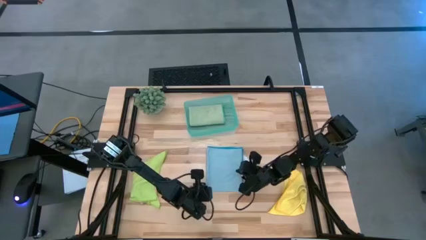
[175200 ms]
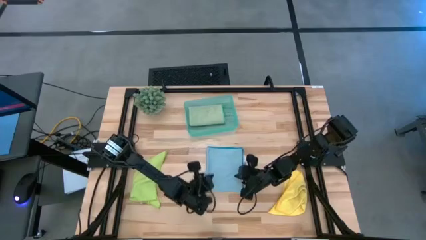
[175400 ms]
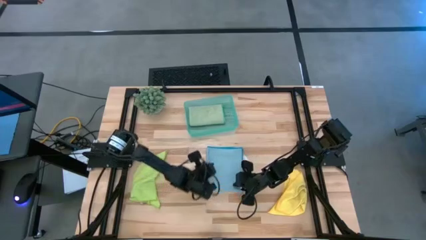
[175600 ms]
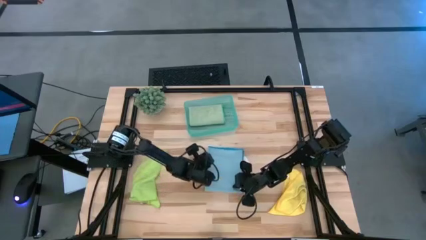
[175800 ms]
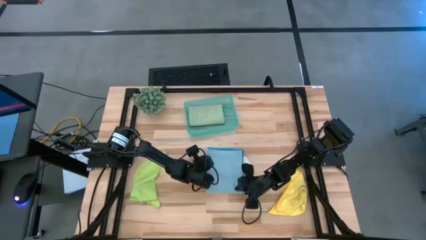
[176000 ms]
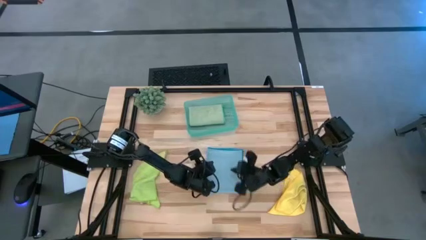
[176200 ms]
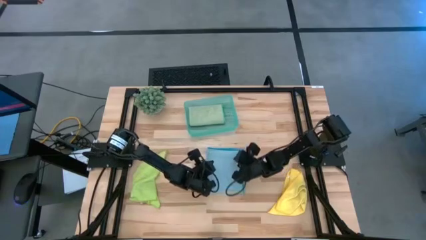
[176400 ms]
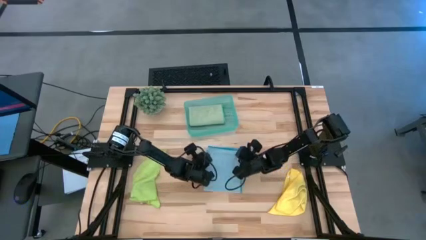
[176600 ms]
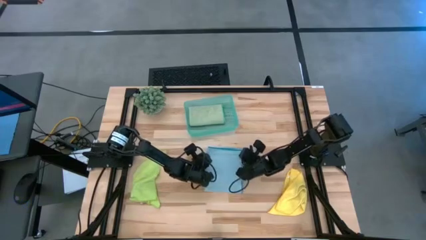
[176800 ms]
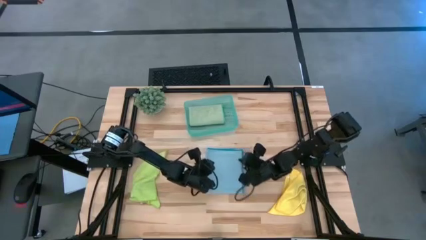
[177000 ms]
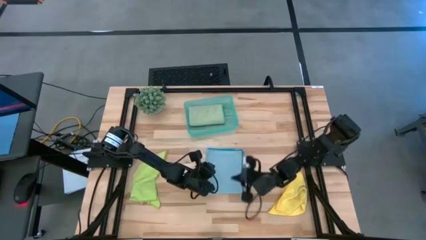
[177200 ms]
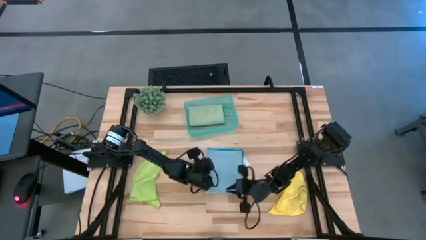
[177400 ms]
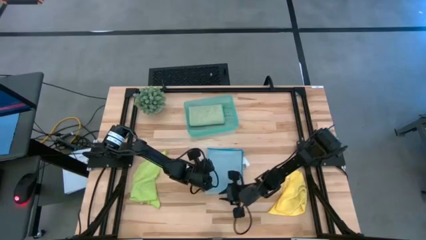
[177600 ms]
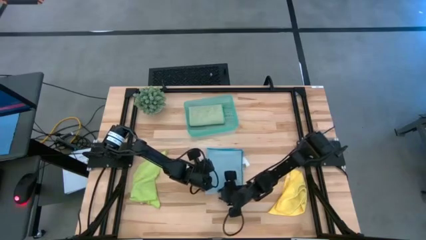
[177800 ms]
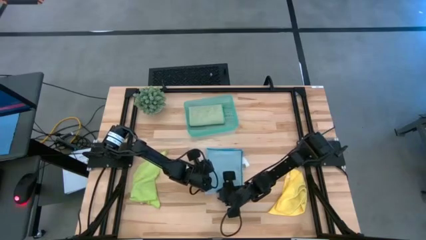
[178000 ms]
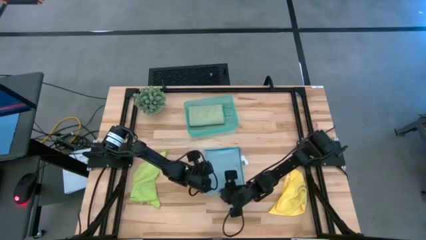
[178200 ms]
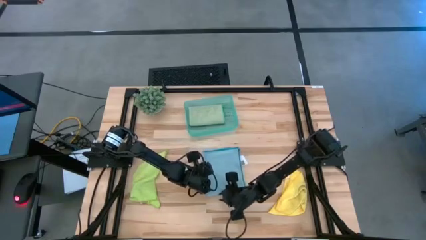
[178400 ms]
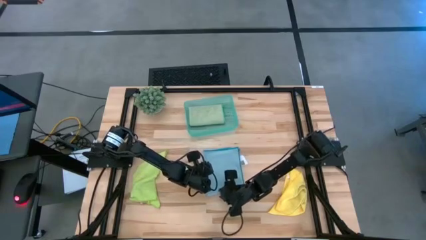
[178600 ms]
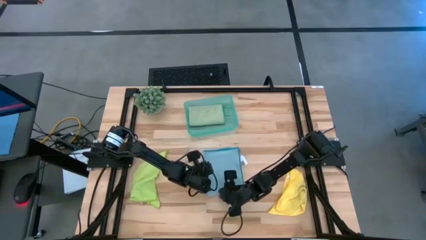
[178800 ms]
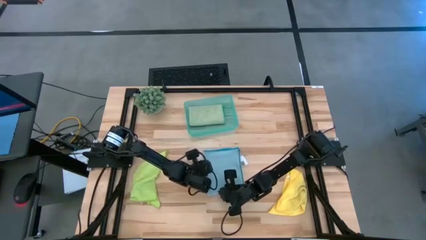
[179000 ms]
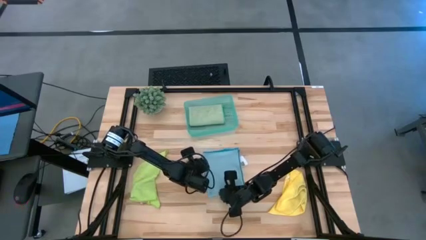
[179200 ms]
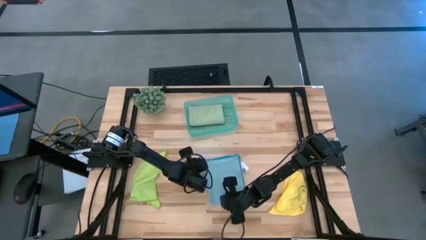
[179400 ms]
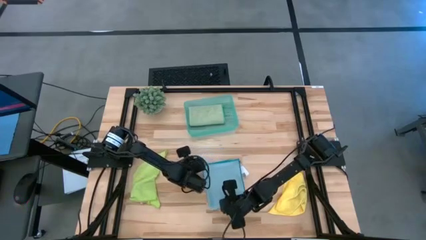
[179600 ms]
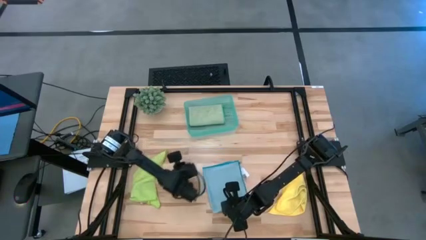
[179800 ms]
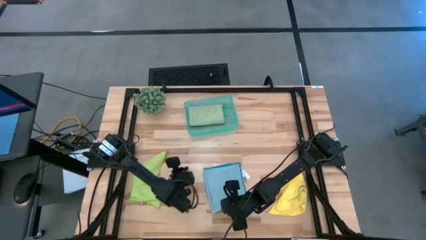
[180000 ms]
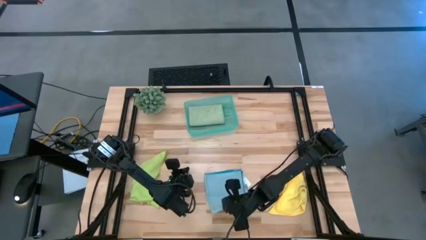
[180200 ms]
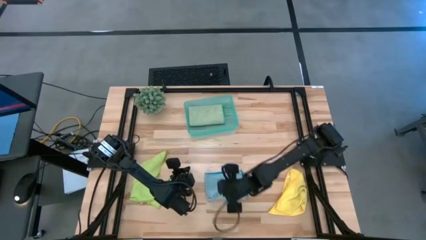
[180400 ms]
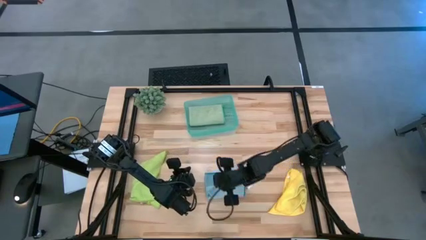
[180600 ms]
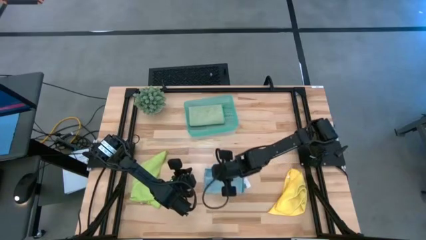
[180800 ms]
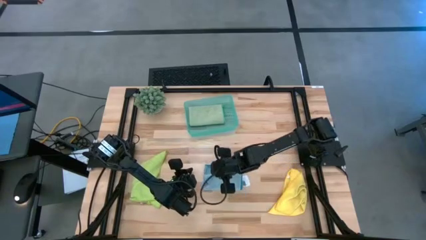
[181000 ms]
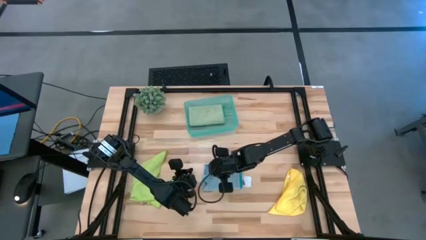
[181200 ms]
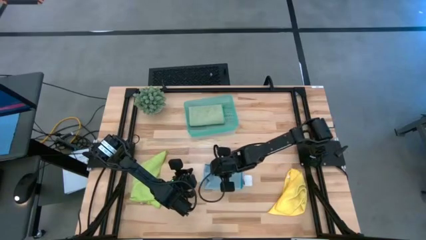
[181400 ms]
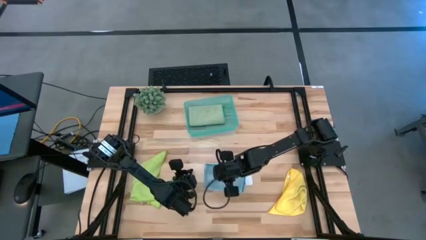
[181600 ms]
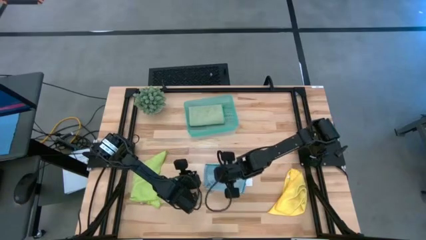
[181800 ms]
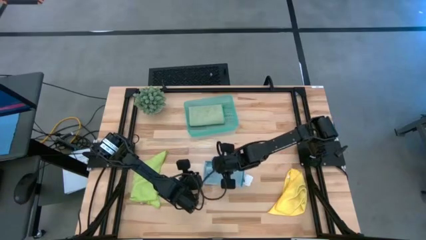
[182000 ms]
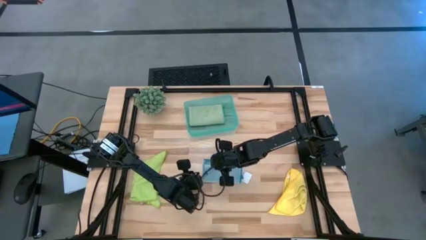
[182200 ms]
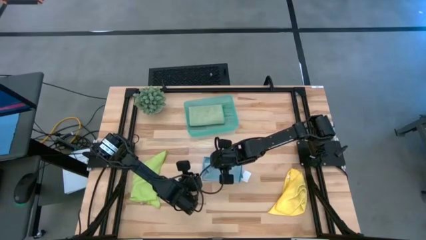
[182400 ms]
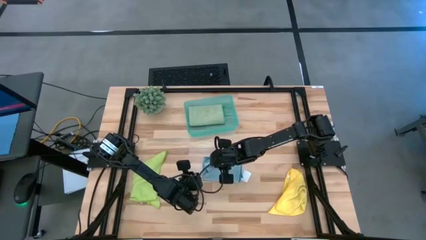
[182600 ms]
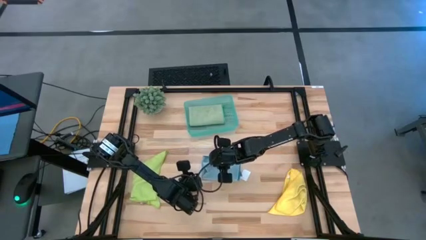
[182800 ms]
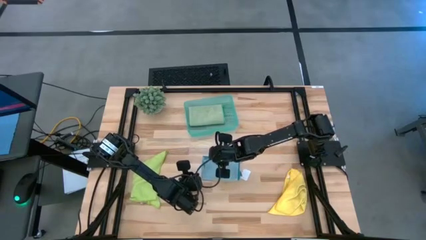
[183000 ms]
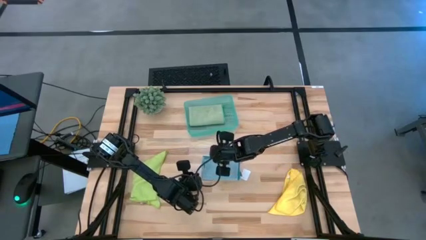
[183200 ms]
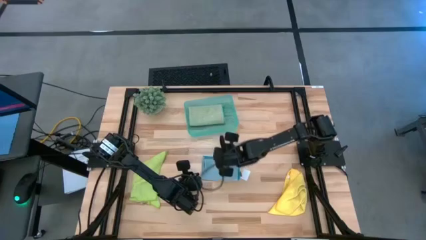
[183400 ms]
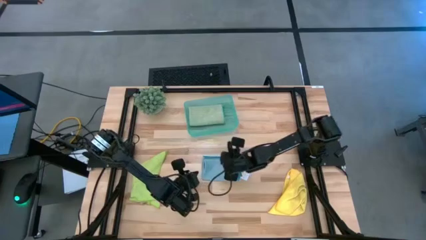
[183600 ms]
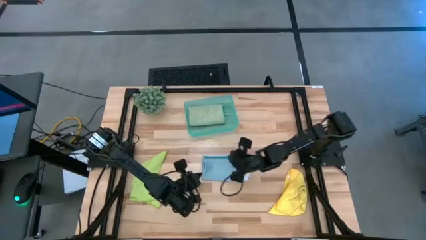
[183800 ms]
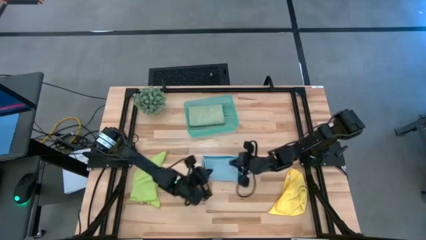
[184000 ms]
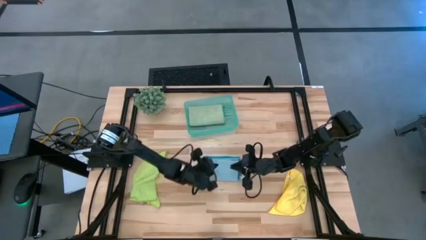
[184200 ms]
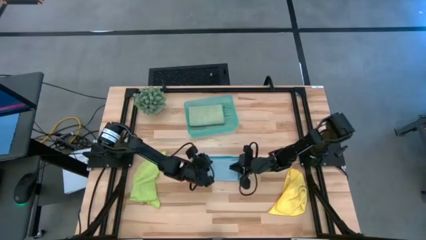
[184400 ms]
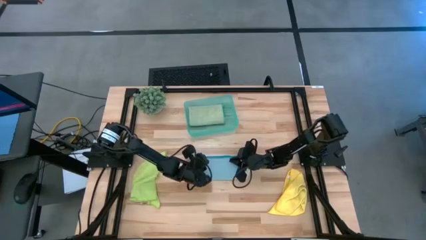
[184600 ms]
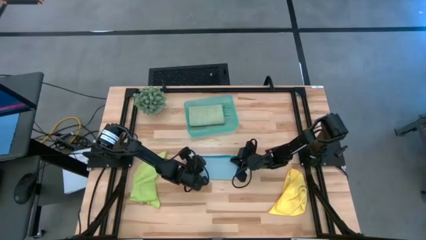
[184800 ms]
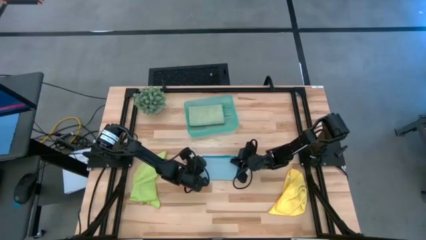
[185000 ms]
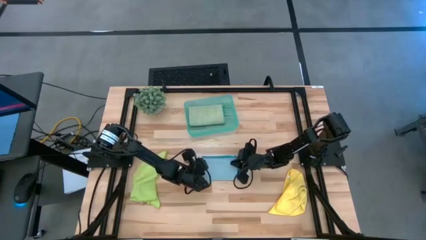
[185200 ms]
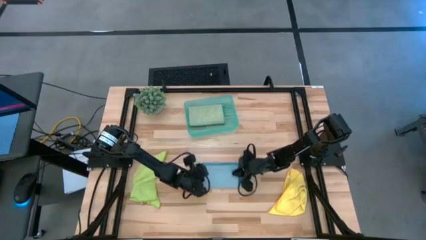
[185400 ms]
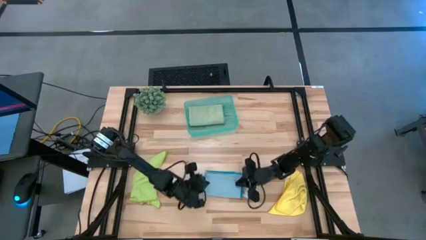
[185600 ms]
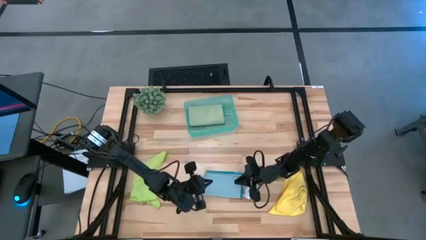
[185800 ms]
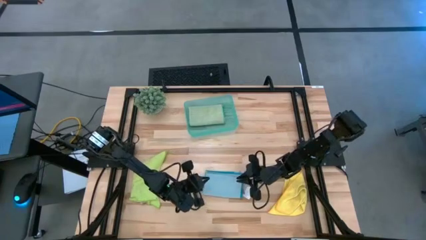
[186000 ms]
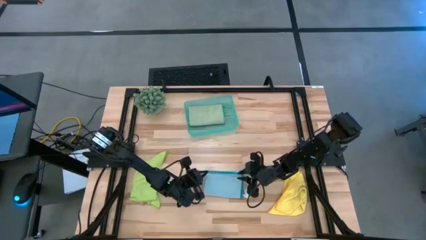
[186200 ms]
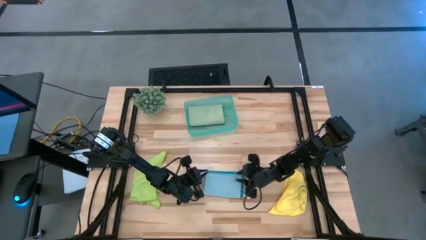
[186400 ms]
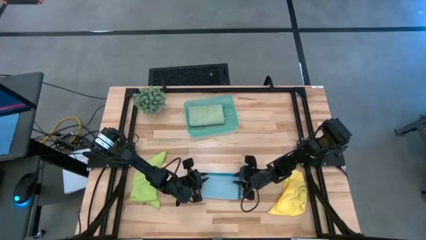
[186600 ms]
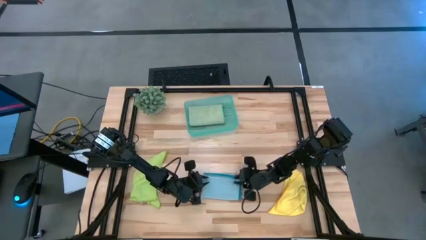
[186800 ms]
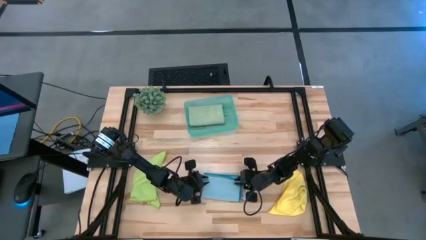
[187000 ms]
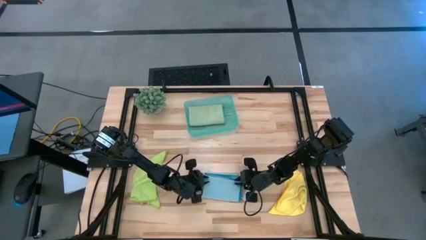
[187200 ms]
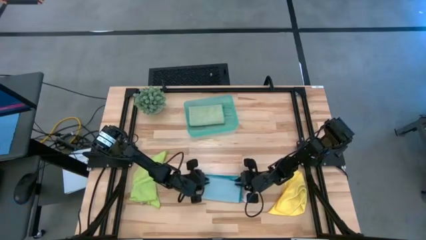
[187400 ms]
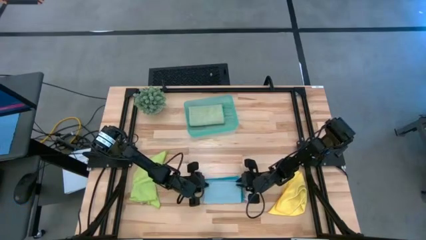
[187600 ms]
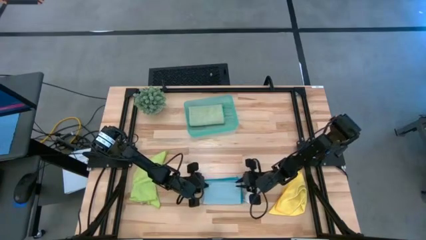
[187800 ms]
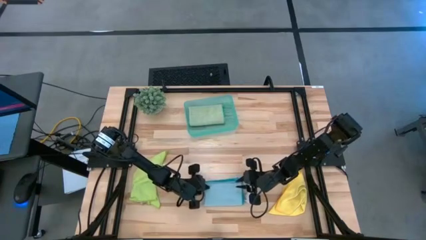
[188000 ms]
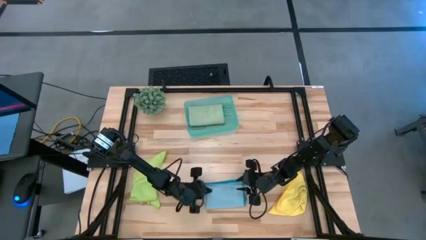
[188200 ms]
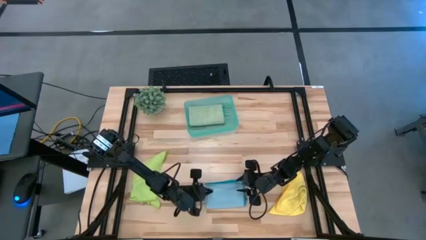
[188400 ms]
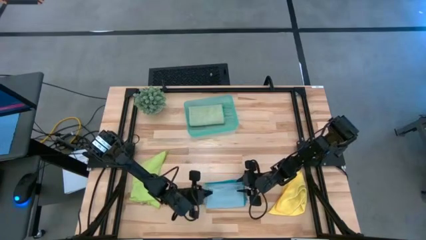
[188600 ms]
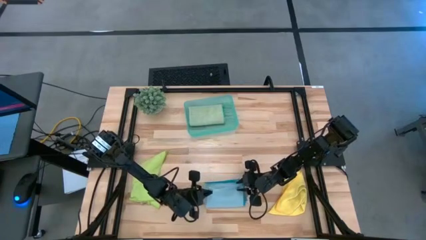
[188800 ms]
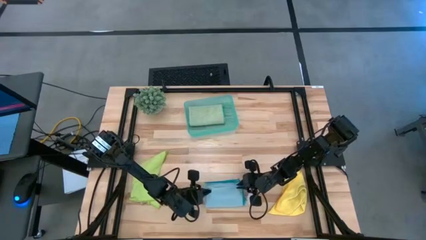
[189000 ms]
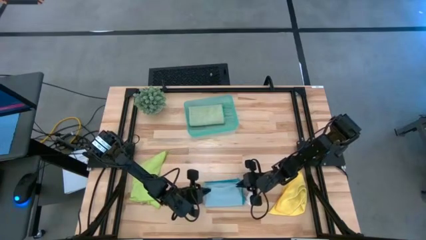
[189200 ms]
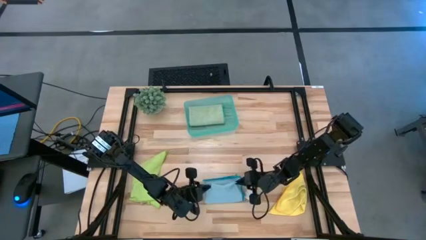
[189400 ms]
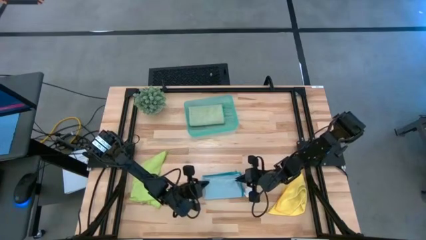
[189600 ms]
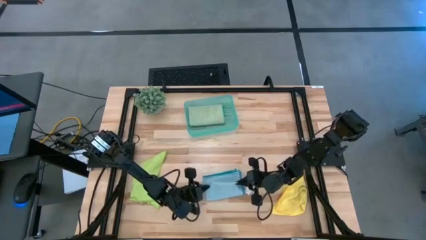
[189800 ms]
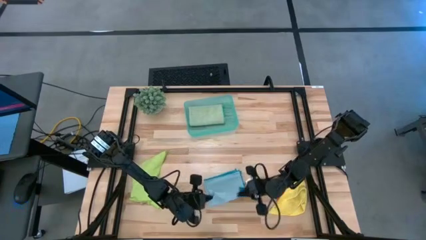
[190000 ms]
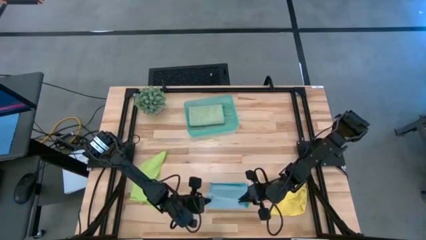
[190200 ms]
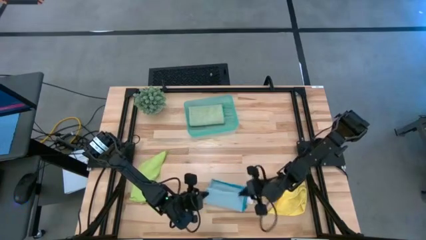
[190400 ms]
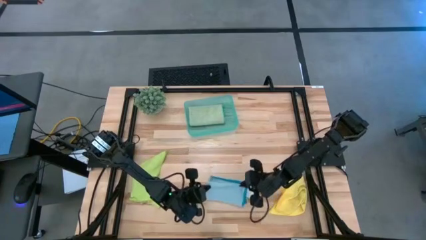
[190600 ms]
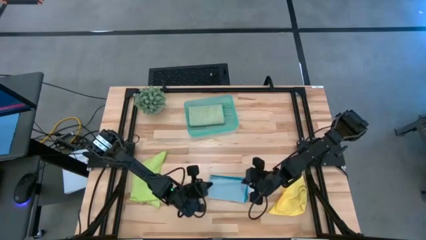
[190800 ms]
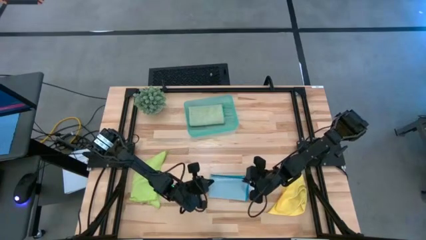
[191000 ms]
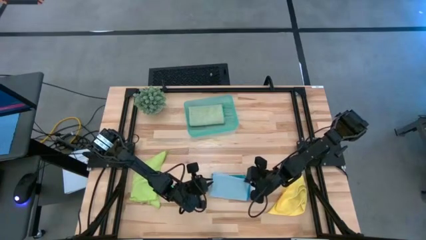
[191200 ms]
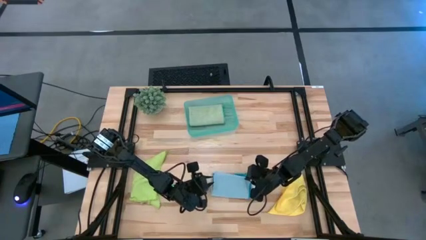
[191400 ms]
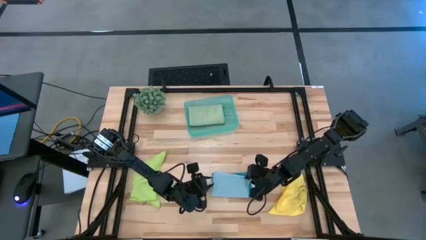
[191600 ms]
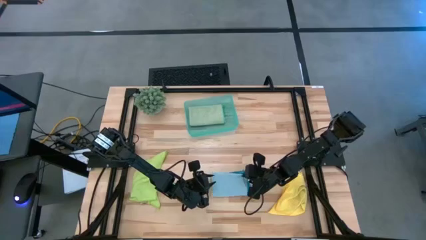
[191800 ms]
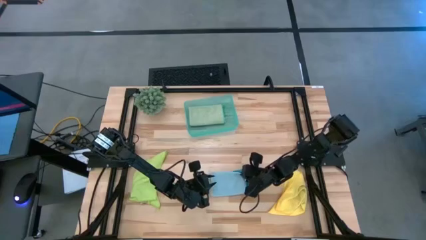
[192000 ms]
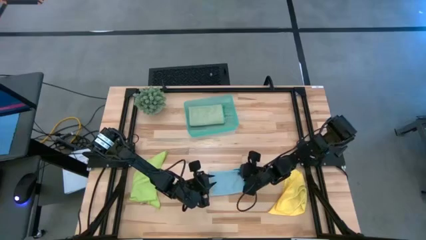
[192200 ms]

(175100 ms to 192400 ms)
Task: Fold microfiber towels
Fold the blue towel
